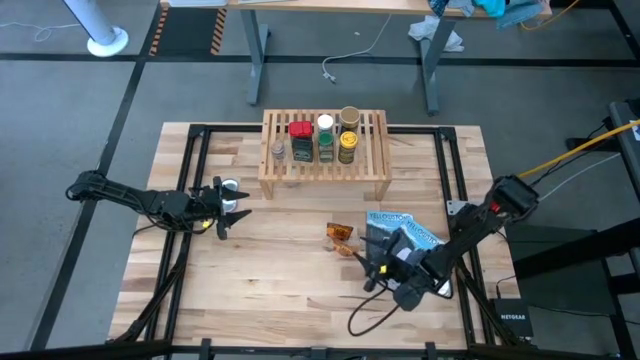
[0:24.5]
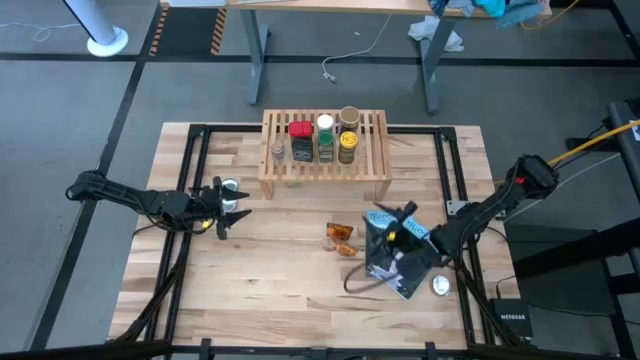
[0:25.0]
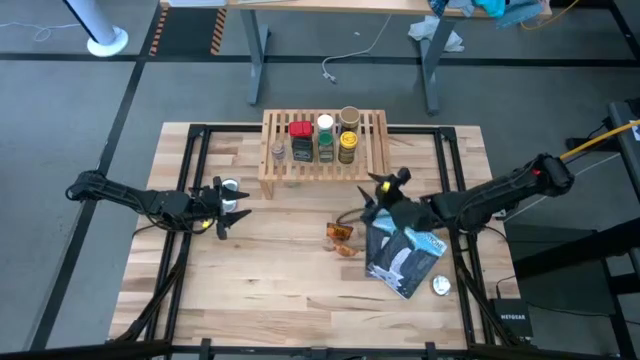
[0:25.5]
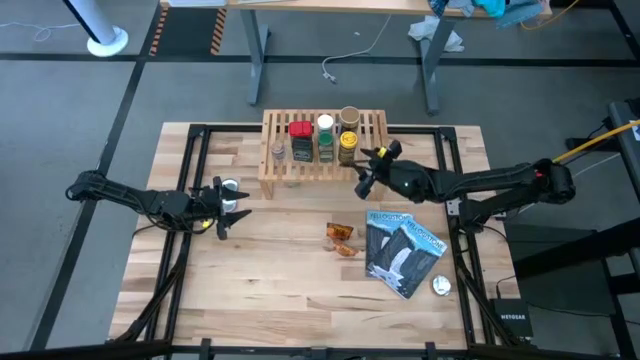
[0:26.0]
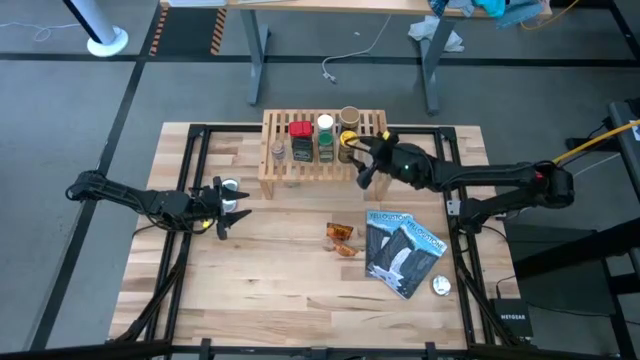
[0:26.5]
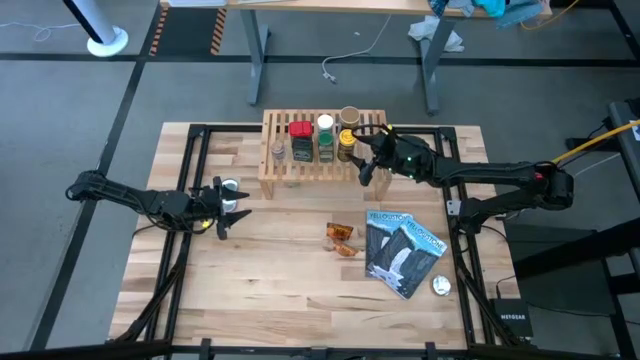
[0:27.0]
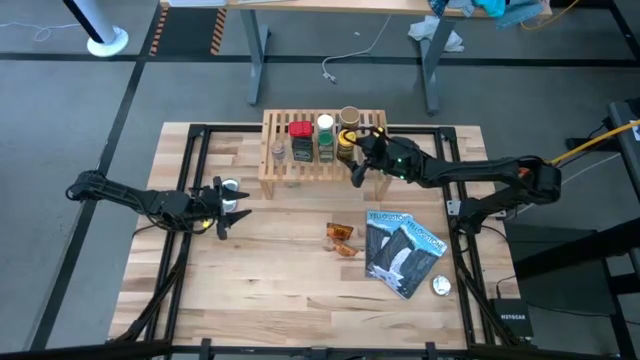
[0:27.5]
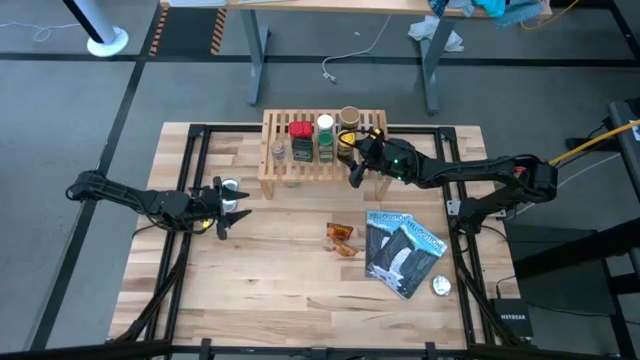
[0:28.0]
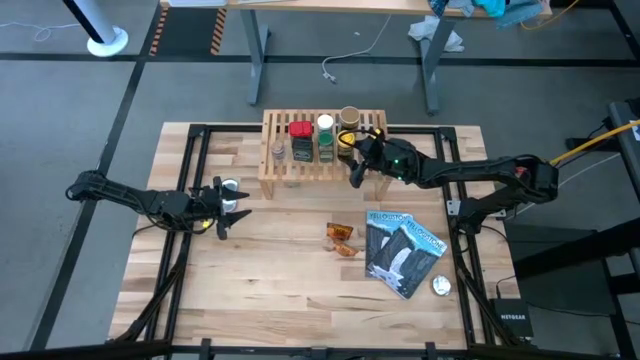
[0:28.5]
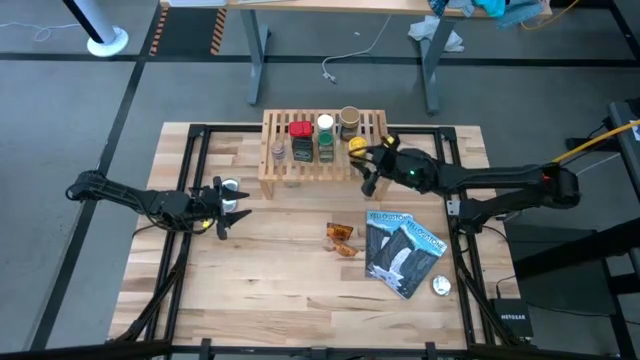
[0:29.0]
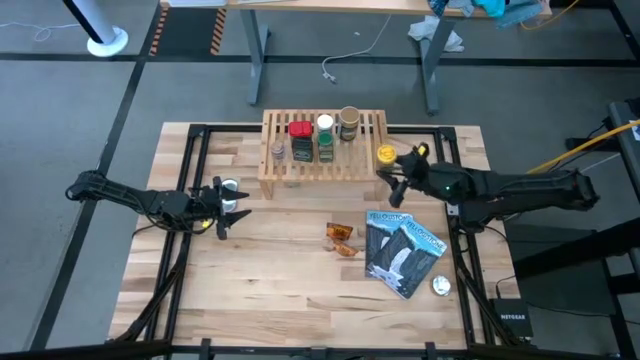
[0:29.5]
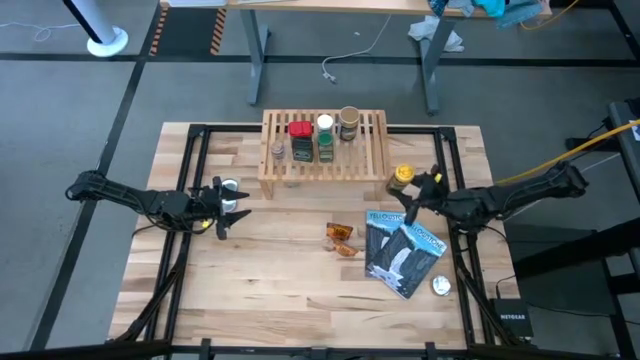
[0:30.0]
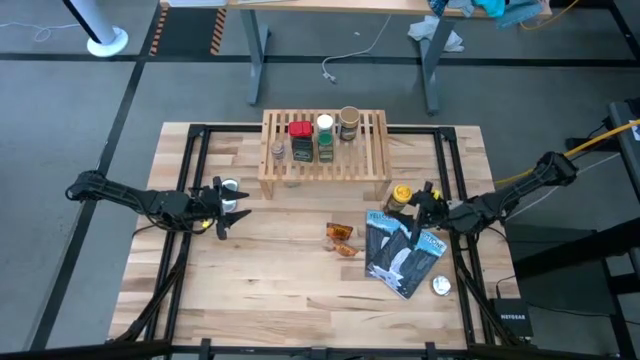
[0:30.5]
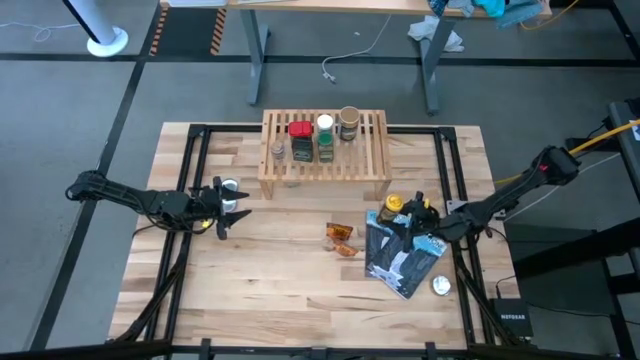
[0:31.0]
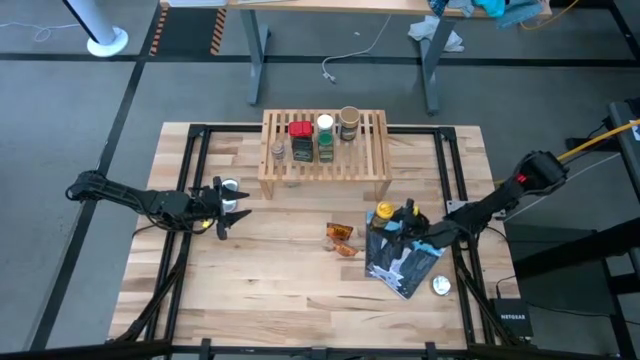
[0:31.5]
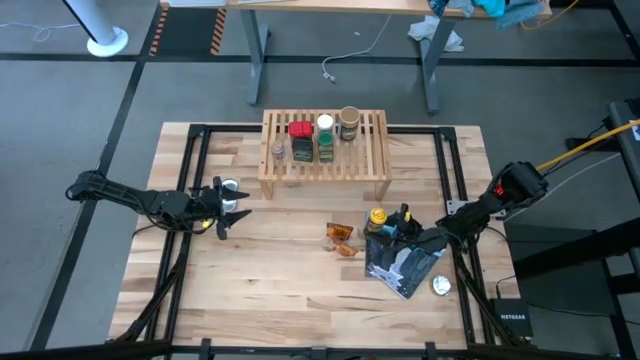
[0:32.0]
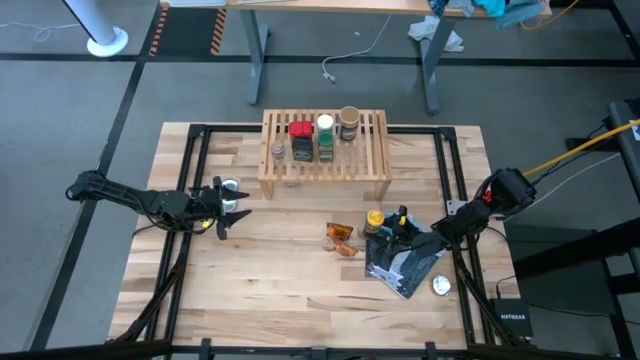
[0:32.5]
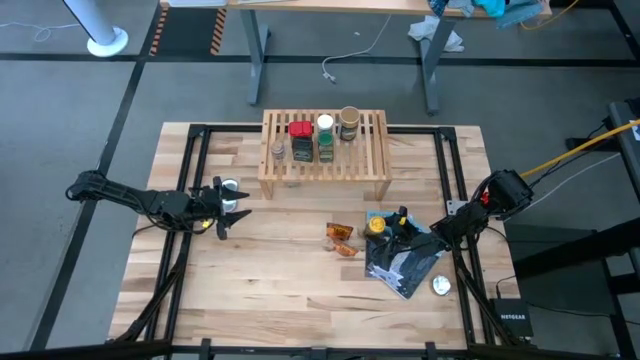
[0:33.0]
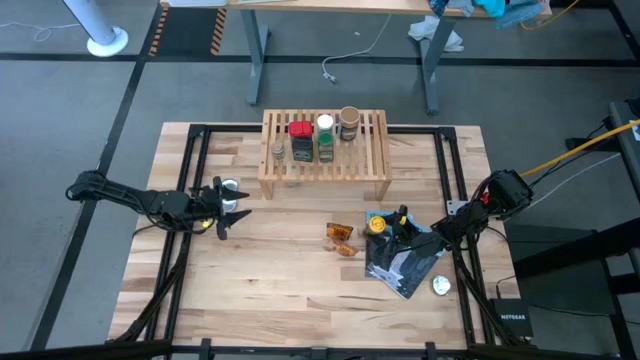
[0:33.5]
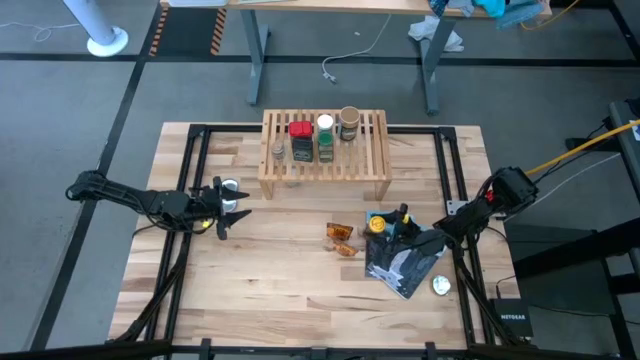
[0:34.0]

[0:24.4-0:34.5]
Task: Shelf spices
Remove the yellow seasoning bottle from the shelf

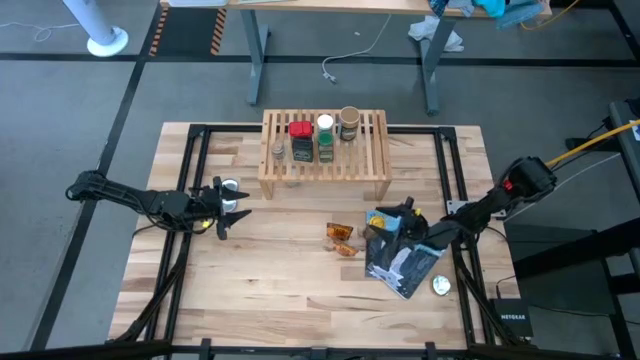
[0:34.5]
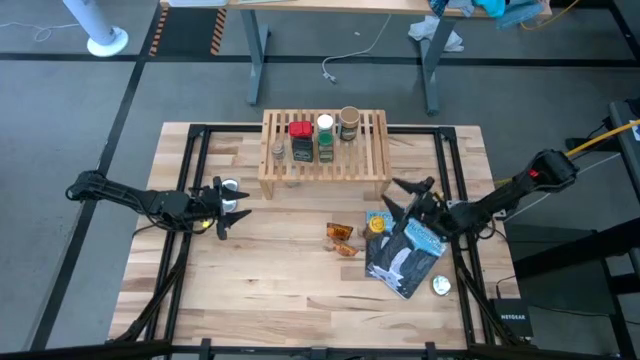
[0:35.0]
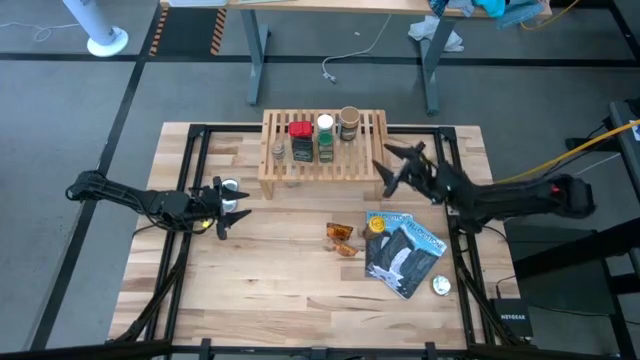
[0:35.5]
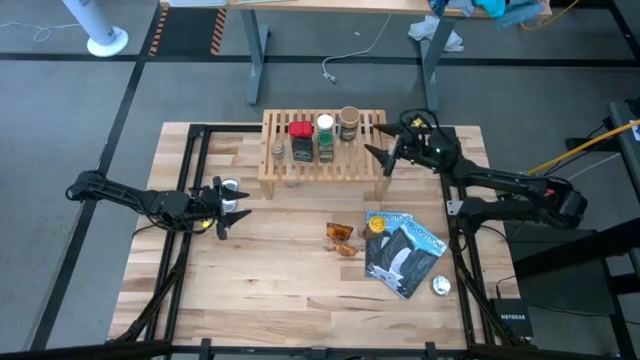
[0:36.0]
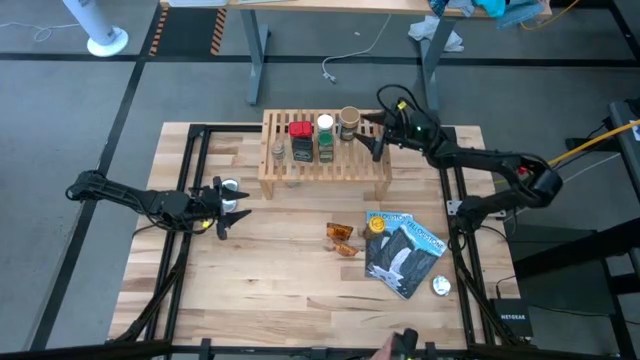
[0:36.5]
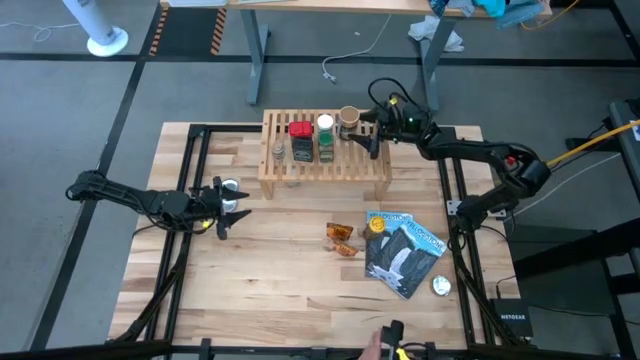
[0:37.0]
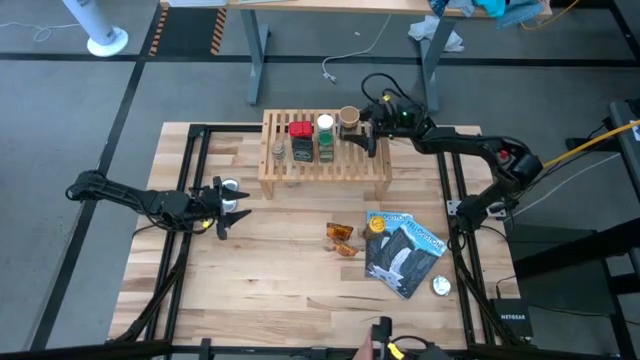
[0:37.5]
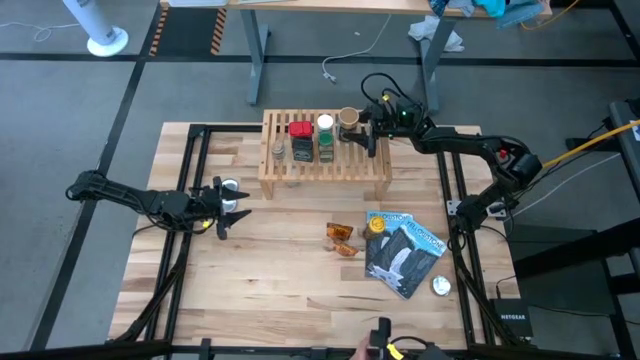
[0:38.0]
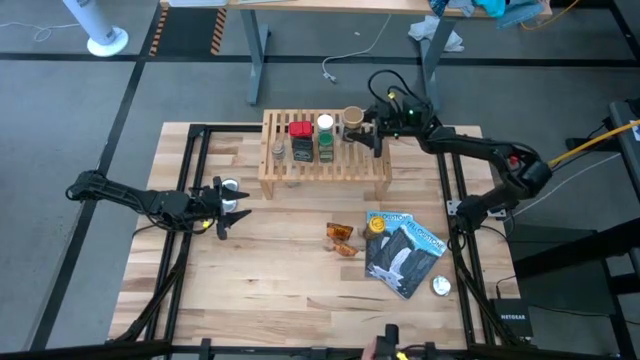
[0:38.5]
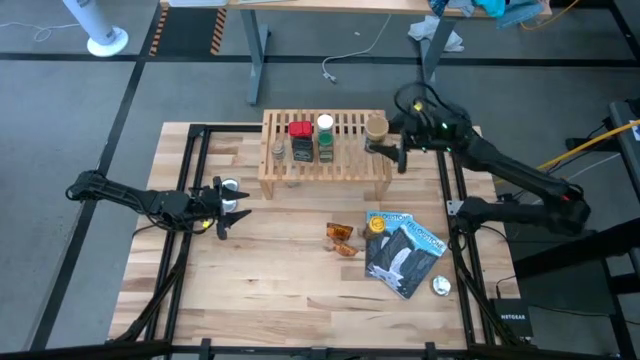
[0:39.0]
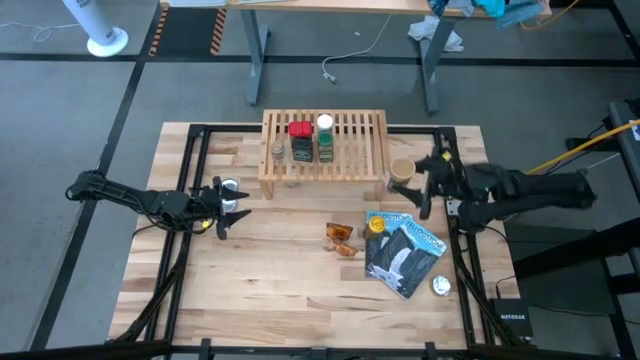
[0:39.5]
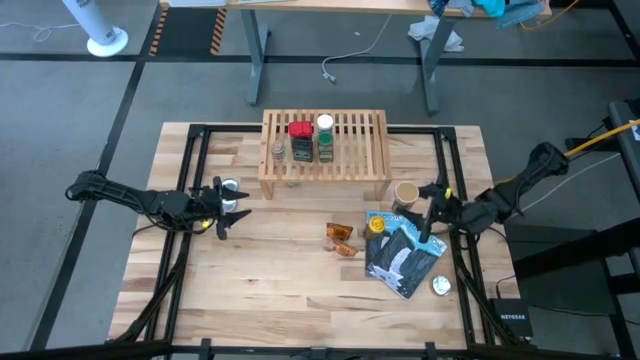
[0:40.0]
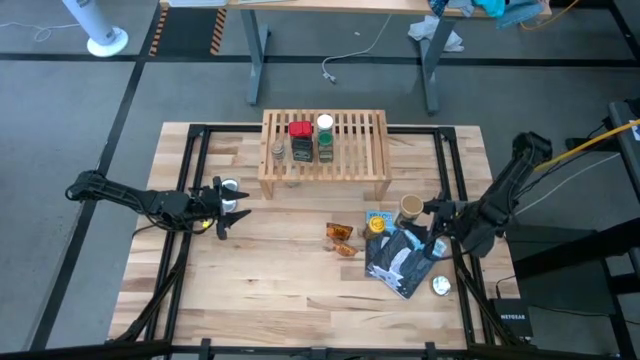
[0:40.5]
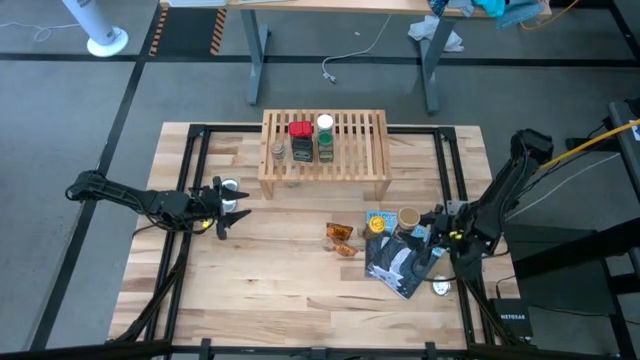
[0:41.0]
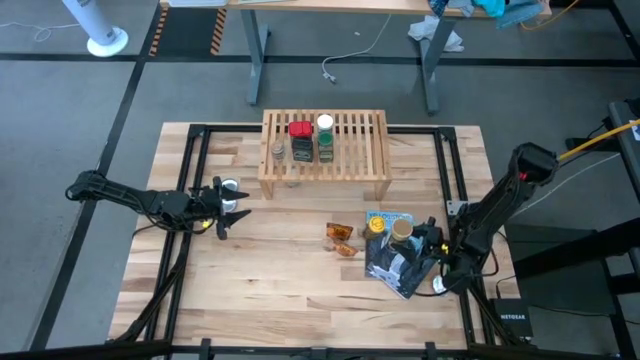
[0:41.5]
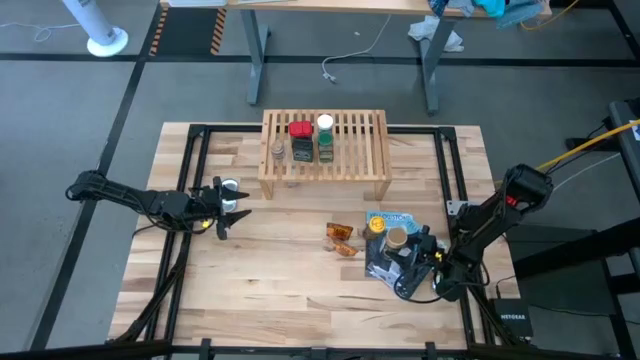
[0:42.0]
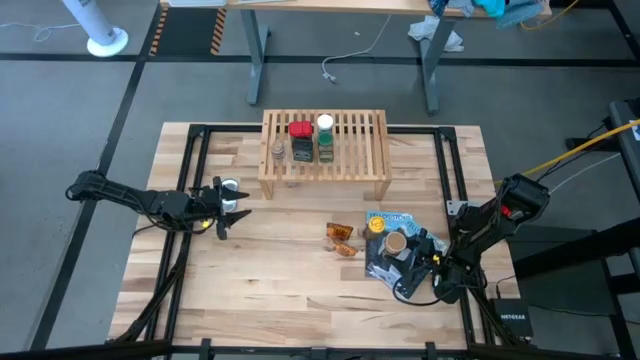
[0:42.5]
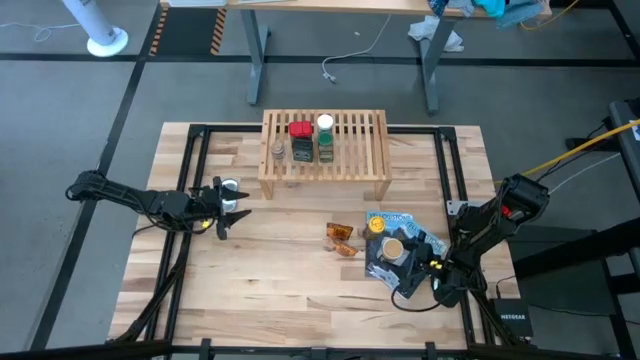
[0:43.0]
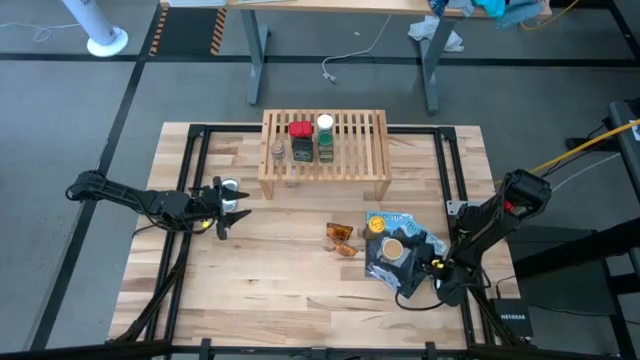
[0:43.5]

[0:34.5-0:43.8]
Remove the gold seasoning bottle from the shelf

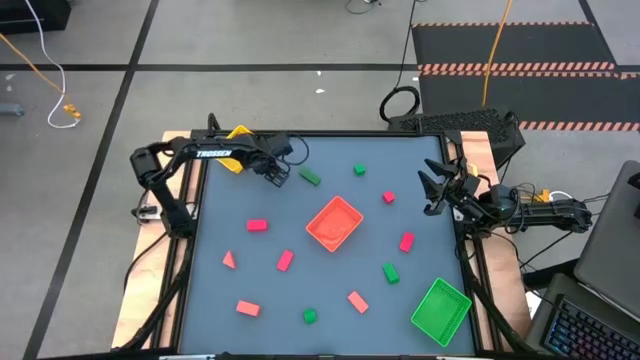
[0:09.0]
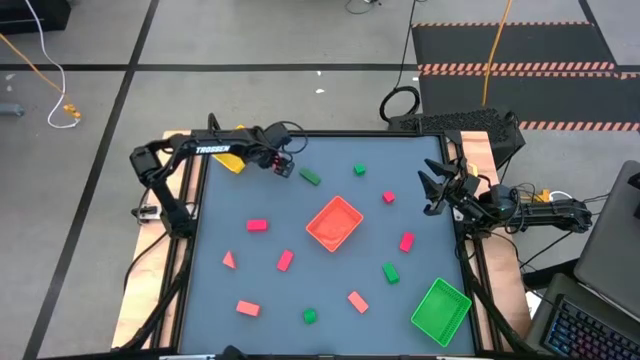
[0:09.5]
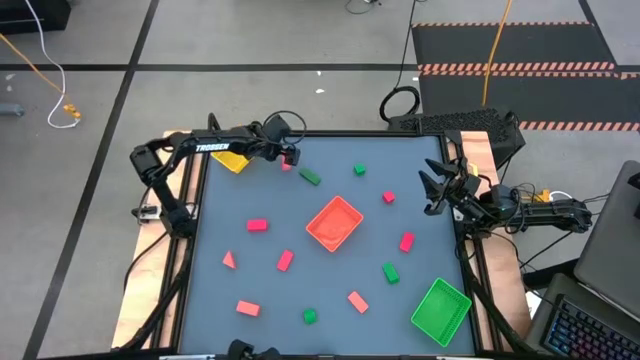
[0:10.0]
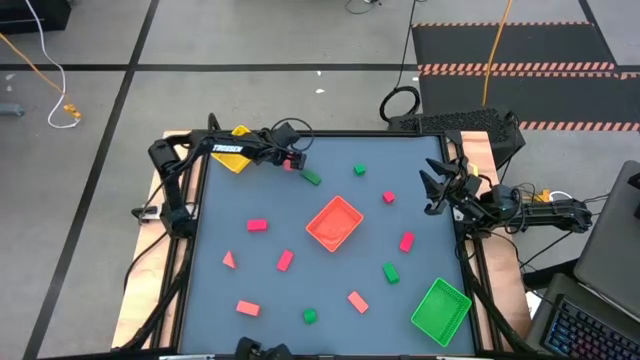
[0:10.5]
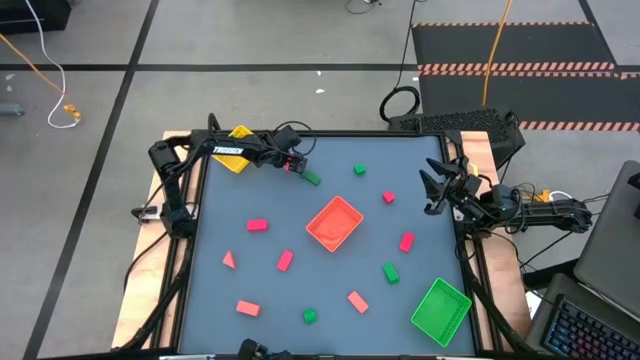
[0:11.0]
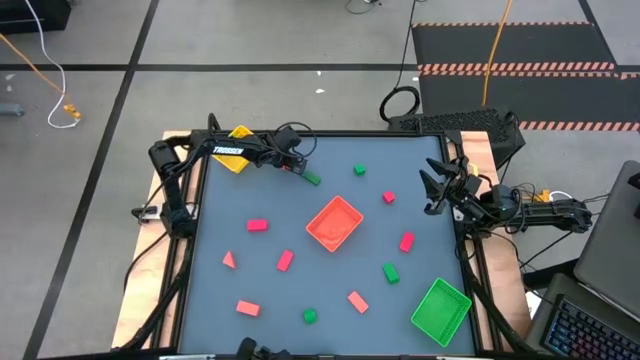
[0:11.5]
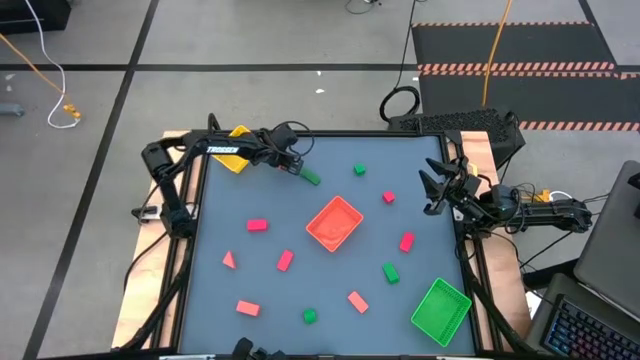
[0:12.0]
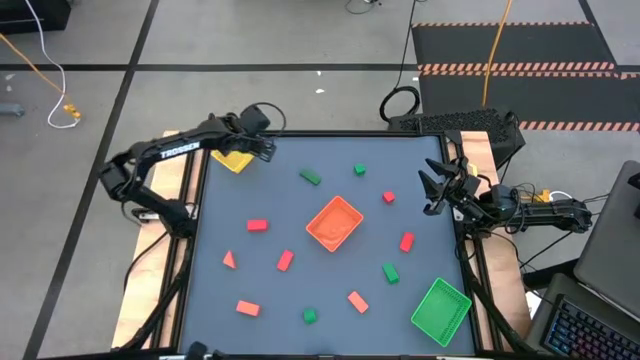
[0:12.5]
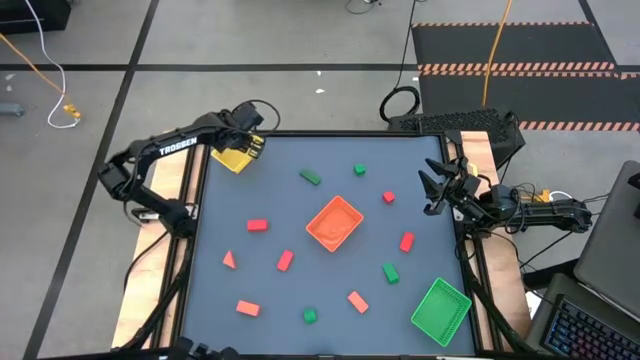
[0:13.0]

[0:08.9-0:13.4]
Task: Sort & place blocks by color
Put the orange block into the yellow bin
